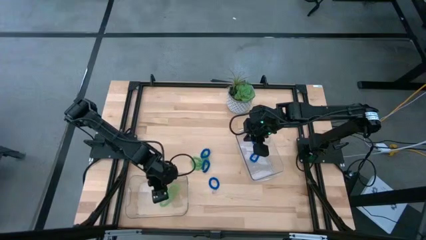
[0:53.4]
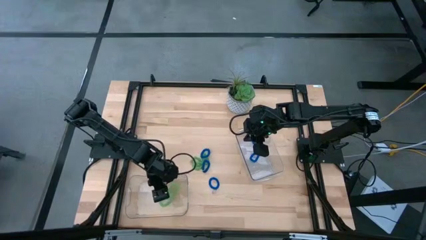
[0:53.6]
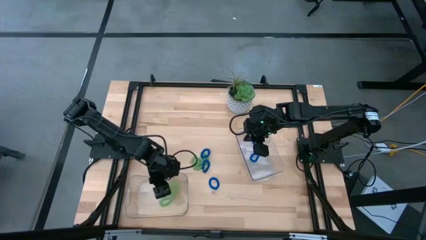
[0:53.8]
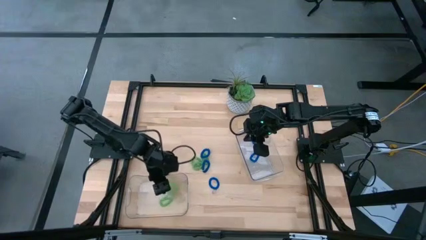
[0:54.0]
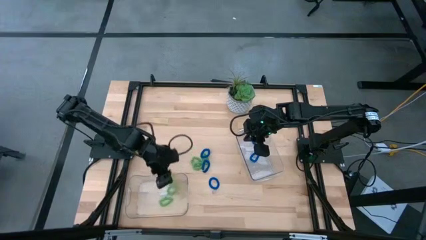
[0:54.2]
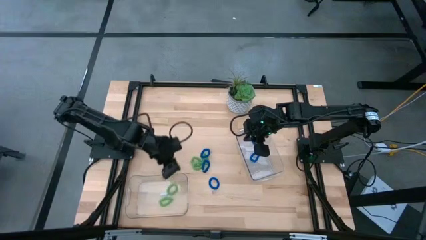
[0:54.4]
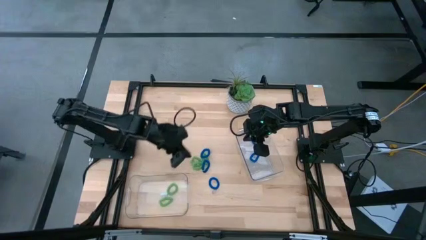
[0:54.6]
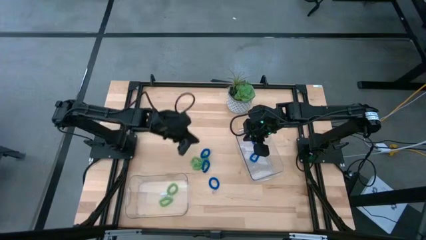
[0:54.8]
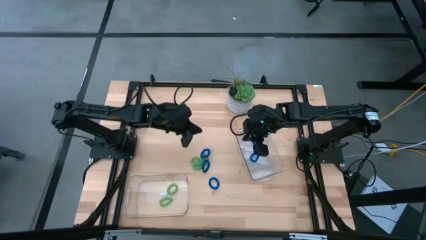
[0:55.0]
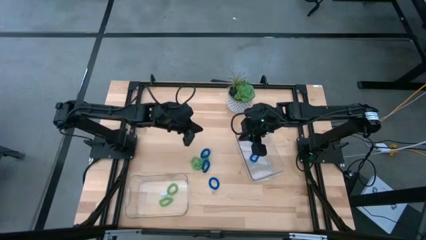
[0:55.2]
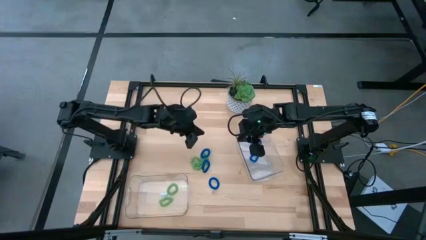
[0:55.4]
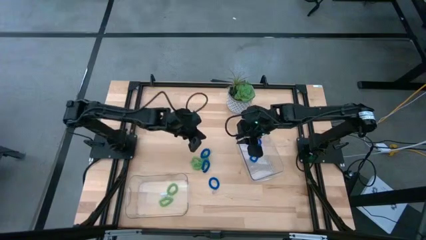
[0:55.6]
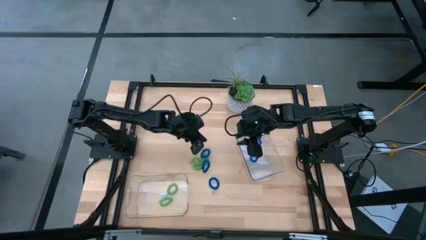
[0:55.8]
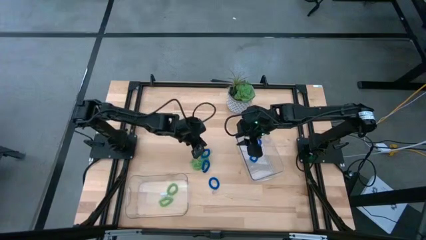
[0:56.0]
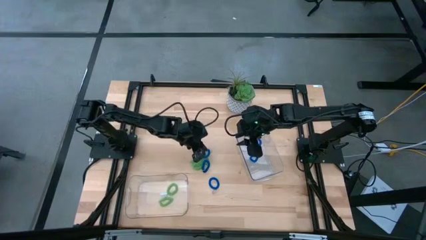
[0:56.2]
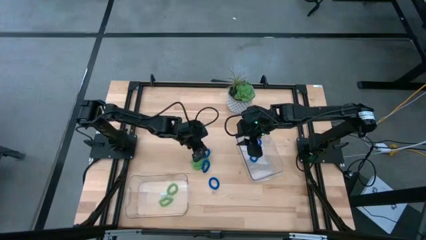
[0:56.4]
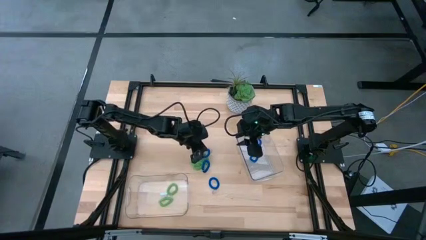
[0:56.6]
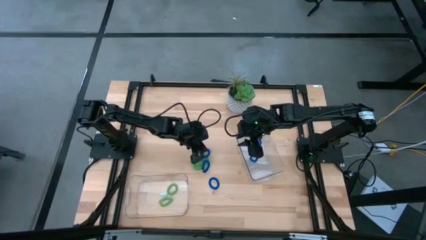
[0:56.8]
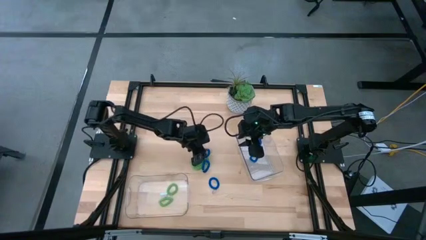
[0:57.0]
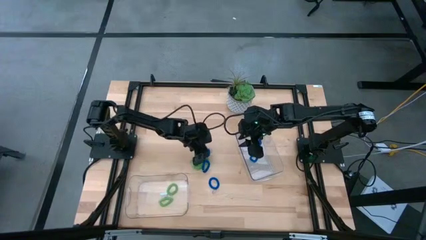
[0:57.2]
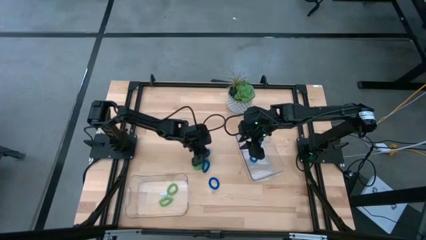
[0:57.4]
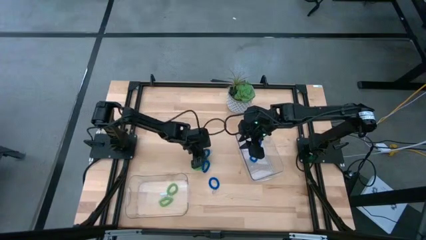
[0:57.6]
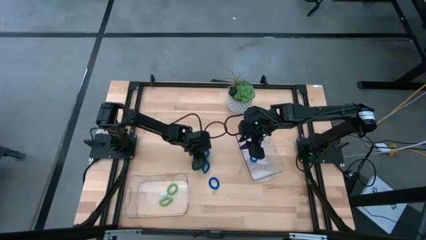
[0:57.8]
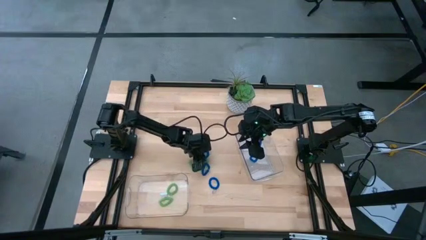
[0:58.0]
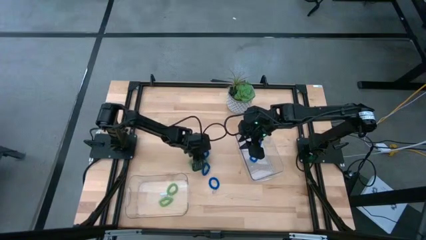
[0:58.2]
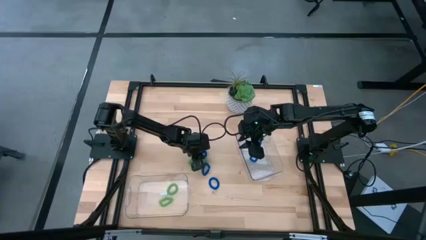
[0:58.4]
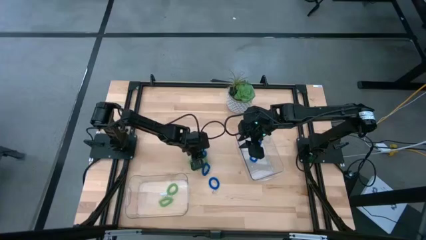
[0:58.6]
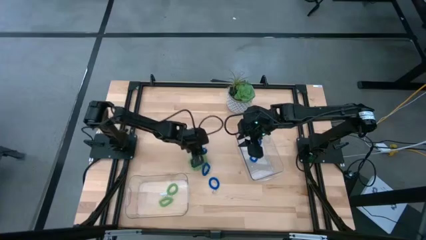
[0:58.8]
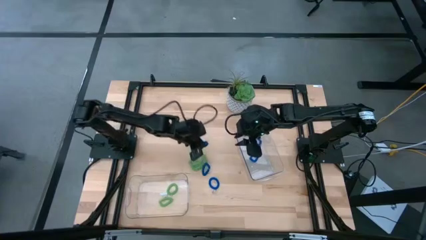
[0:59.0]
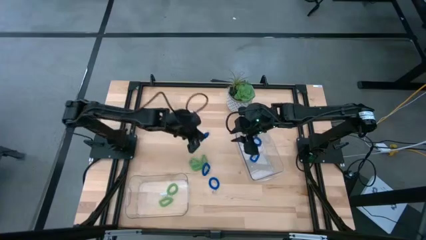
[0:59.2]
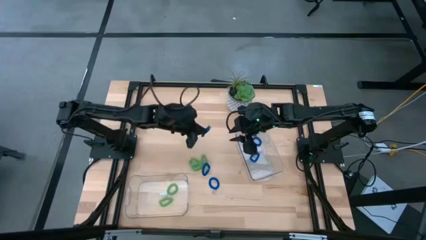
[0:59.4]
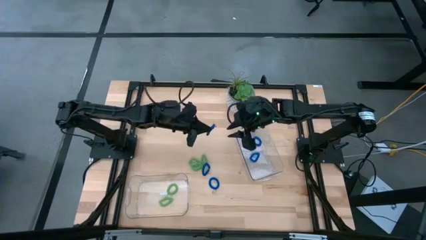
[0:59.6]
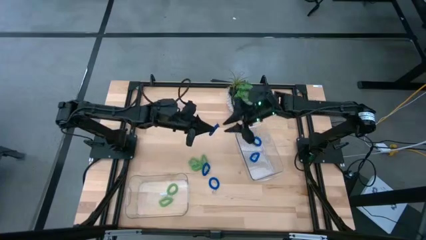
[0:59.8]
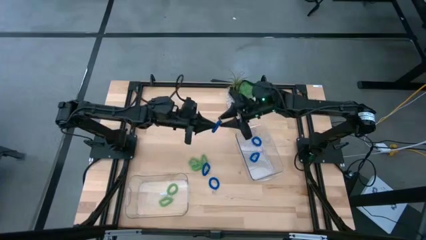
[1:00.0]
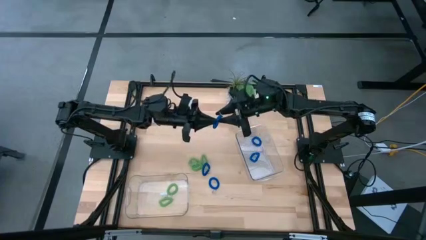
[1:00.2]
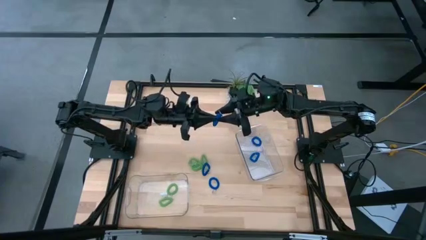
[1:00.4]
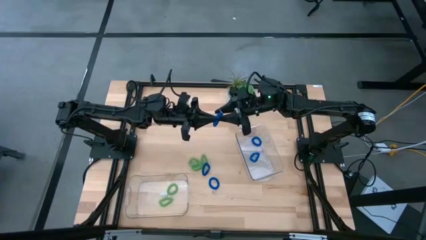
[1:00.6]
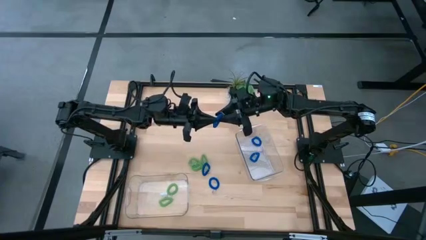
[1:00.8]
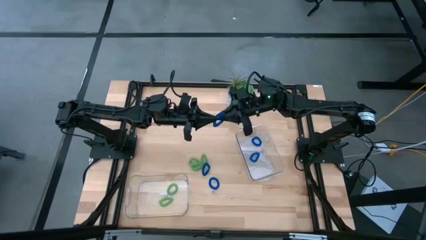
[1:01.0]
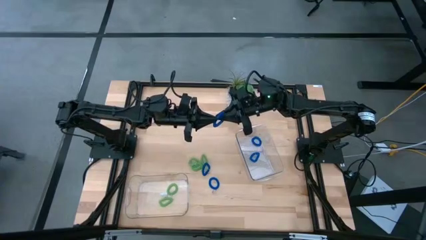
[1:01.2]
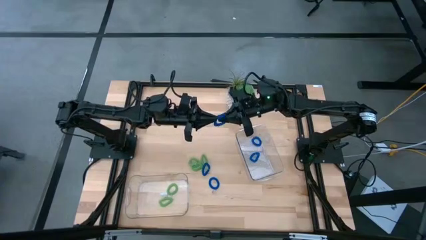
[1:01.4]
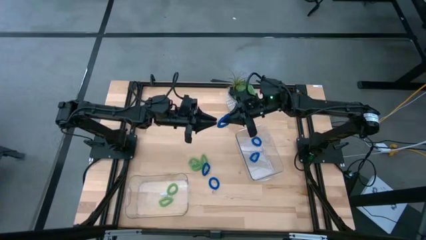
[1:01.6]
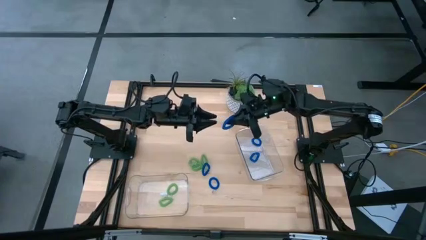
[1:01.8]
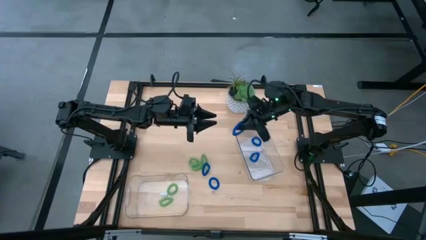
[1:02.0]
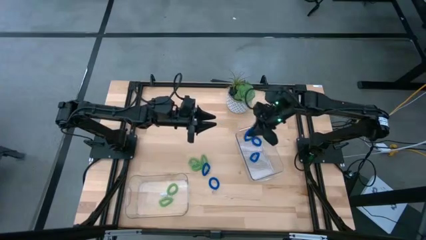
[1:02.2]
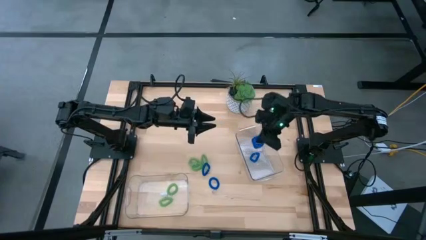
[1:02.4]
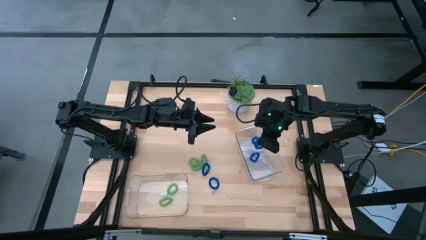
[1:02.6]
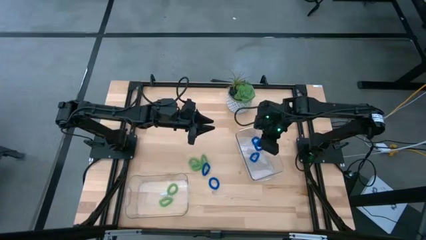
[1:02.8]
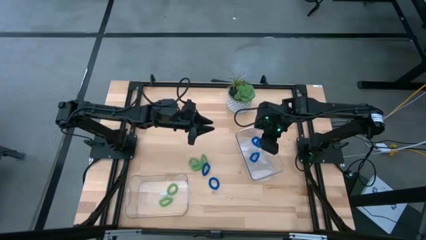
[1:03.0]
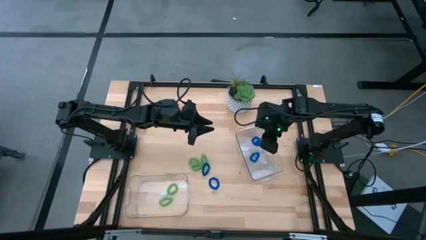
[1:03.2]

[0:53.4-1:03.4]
Task: Sort spring keychains
Put the blue spring keychain into the right transparent bin

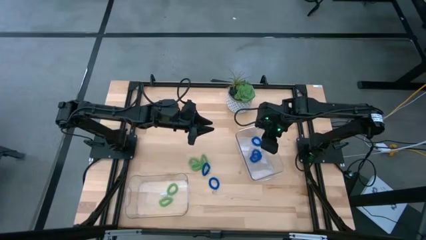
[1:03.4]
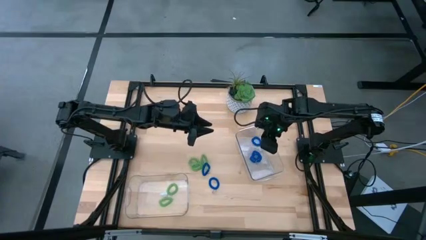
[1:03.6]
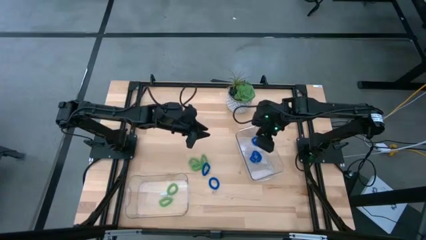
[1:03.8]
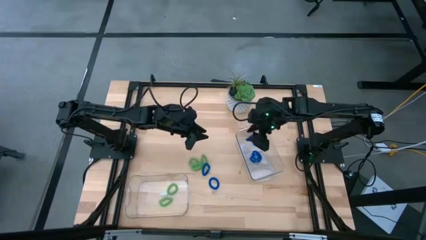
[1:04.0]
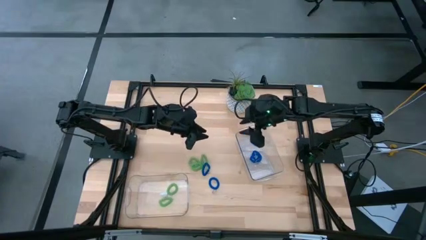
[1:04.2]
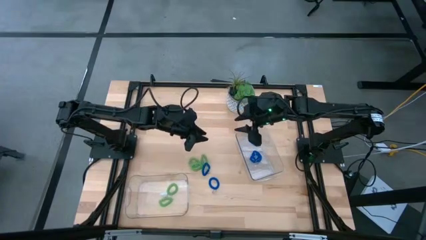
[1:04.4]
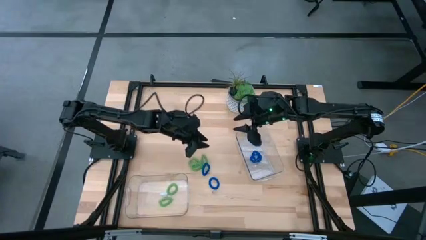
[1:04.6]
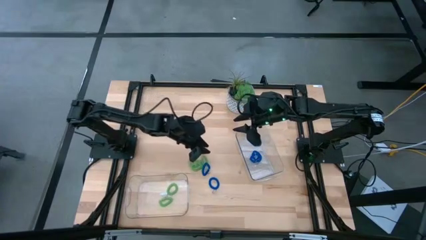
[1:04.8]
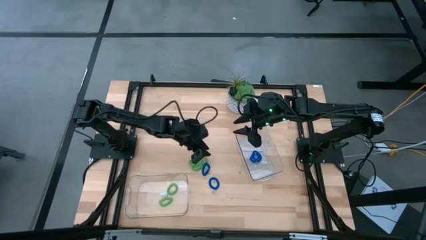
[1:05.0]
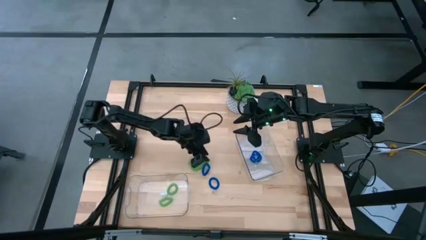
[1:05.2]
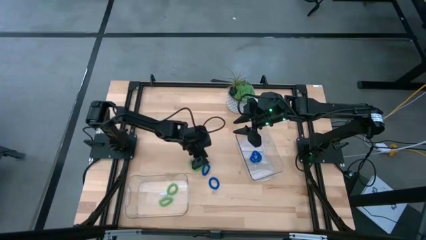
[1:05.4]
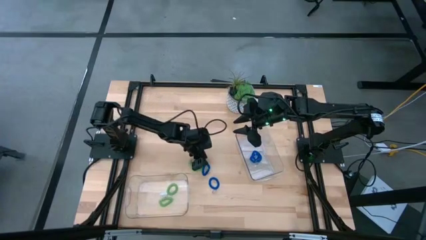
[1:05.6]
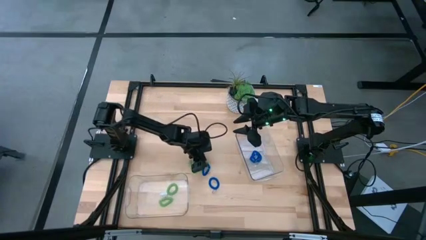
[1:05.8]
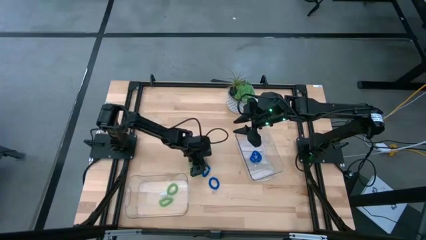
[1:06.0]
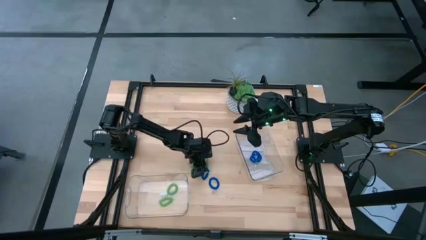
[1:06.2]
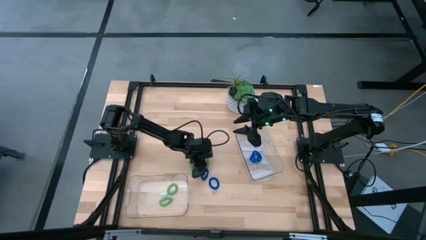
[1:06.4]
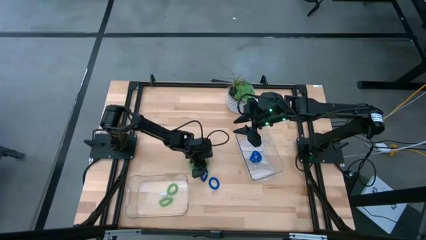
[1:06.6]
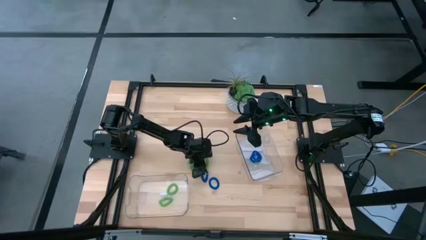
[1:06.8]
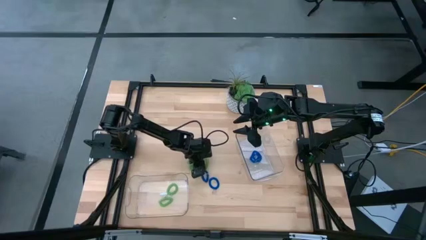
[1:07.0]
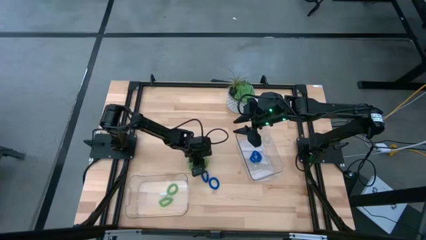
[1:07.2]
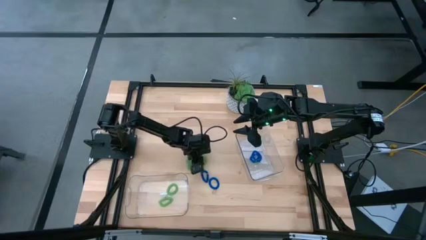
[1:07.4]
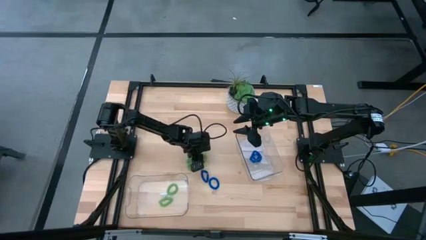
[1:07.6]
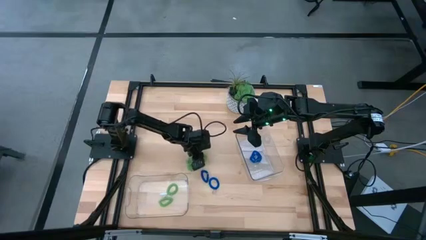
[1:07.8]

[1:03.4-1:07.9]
Put the green spring keychain into the left transparent bin

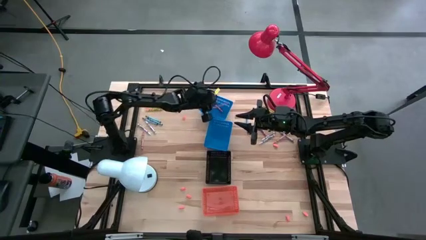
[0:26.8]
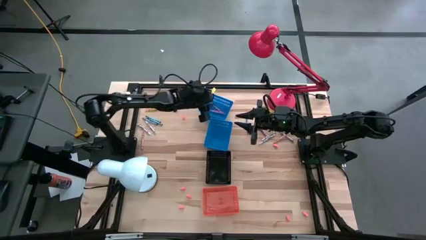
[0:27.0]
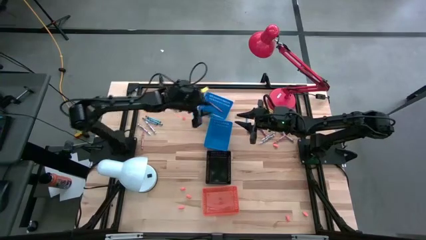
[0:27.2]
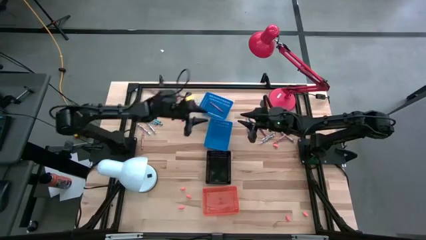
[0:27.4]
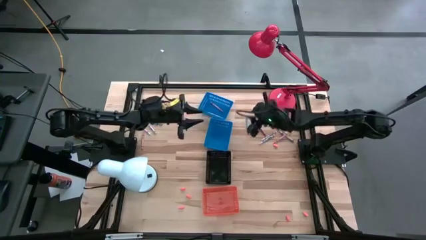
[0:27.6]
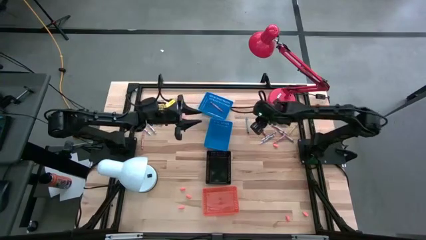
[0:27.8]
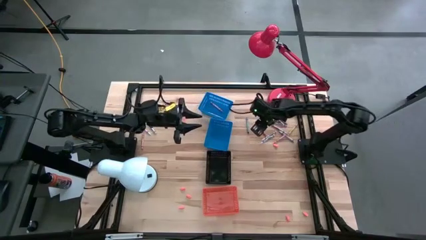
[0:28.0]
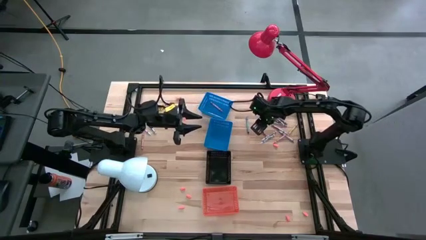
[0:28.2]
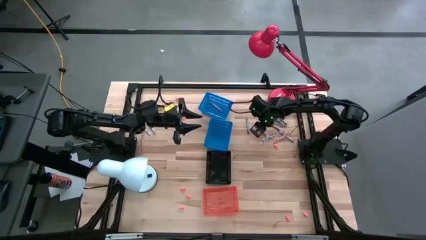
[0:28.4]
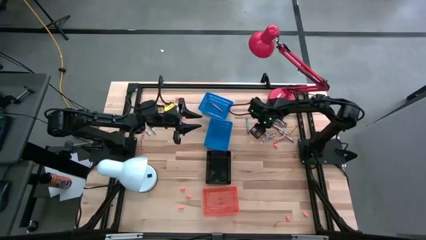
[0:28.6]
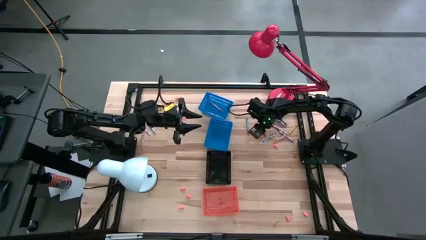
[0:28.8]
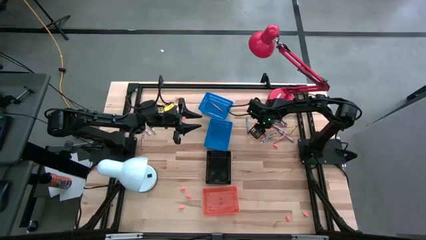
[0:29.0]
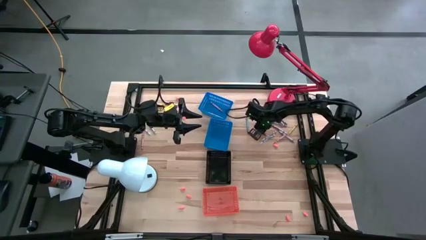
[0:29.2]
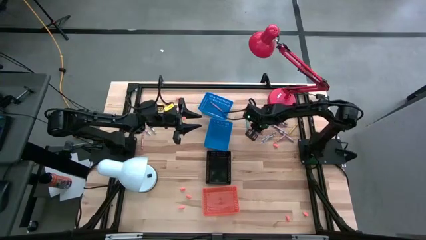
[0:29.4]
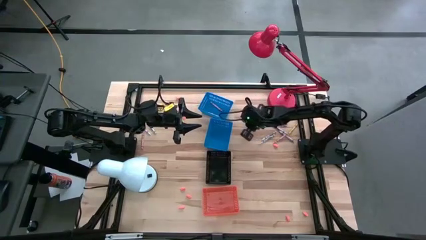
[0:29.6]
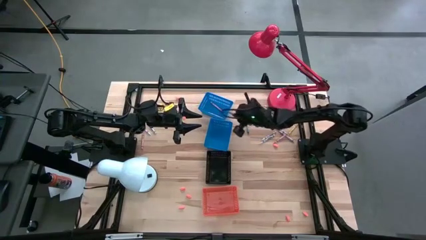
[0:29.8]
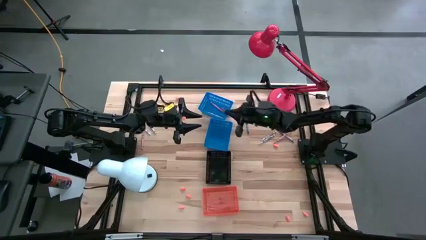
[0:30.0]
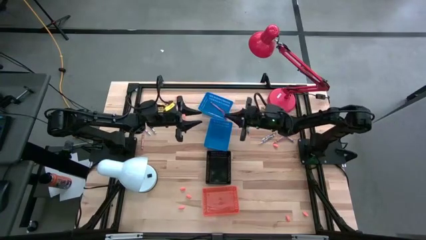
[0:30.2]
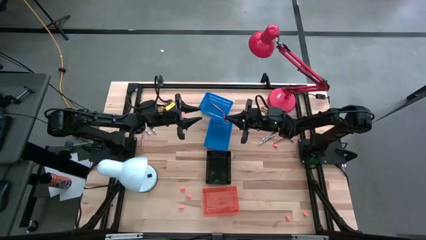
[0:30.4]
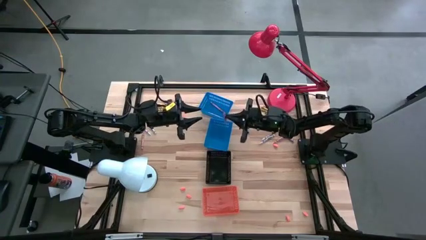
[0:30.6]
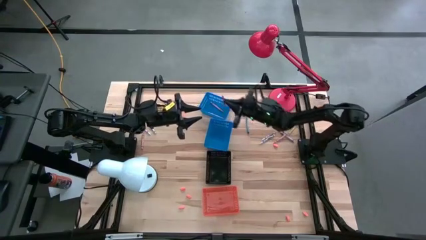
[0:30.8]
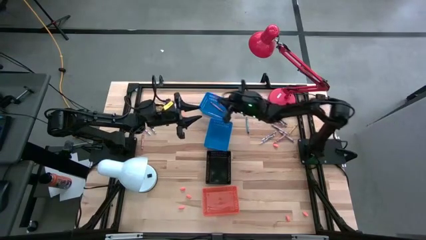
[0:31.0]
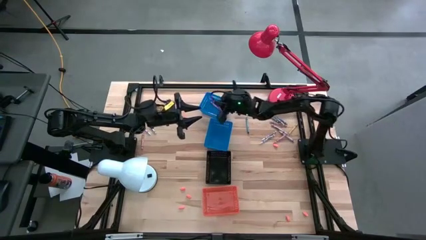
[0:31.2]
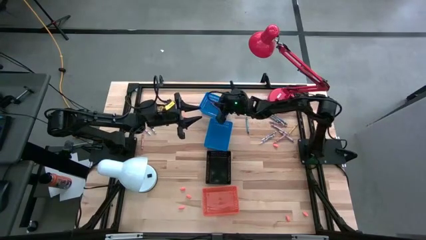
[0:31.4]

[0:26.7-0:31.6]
Task: Sort crayons
Put the pink crayon into the top blue bin
